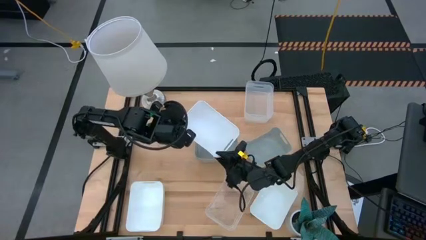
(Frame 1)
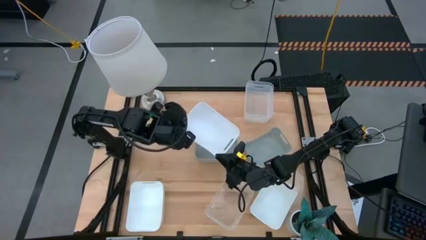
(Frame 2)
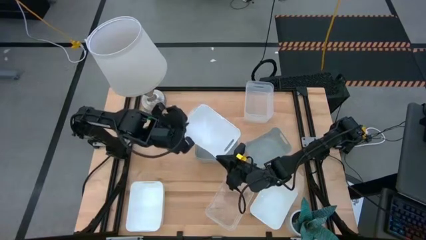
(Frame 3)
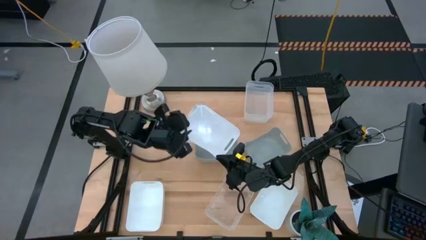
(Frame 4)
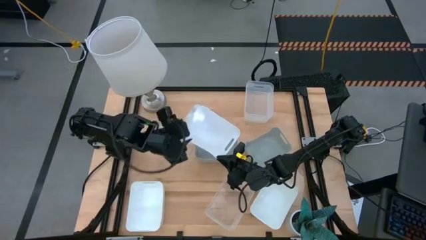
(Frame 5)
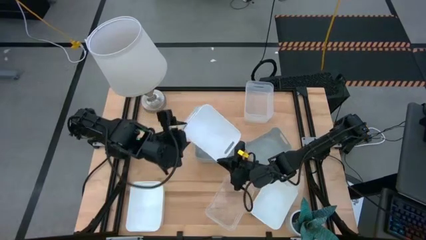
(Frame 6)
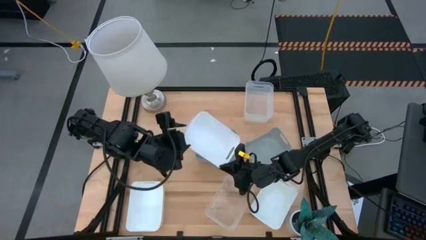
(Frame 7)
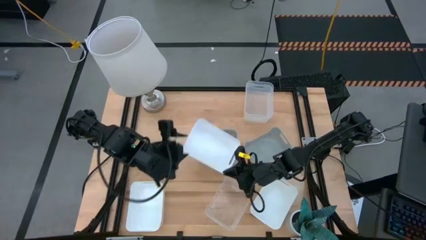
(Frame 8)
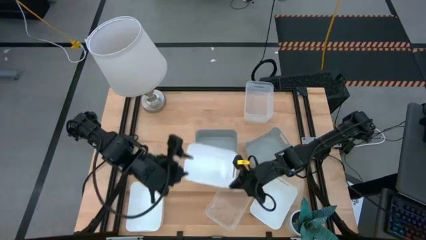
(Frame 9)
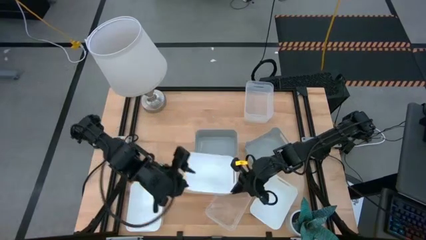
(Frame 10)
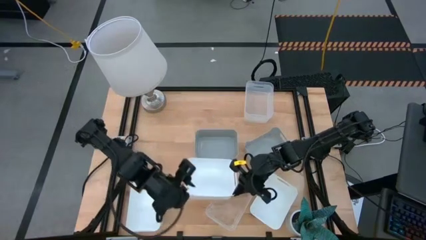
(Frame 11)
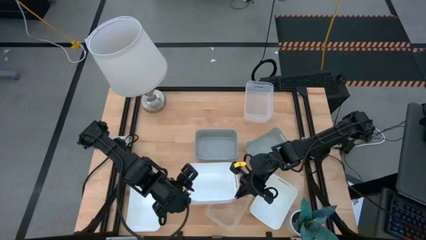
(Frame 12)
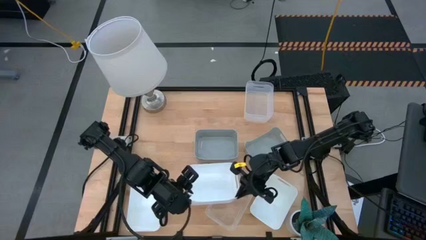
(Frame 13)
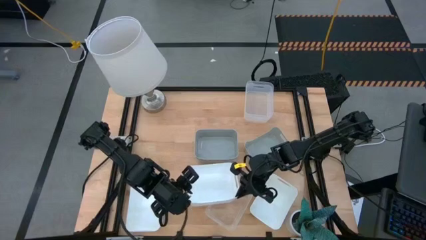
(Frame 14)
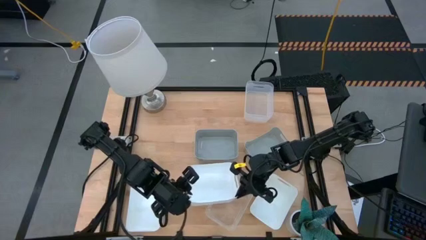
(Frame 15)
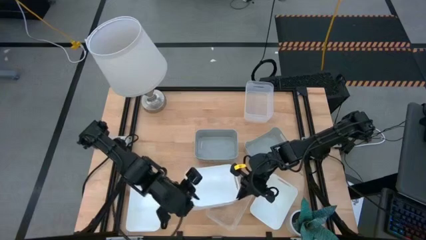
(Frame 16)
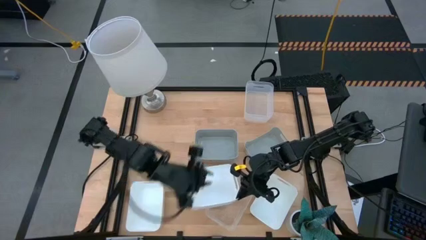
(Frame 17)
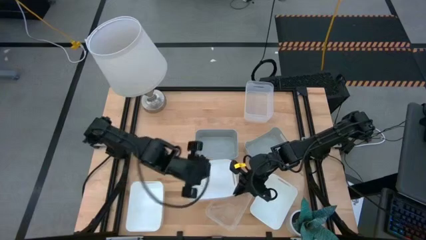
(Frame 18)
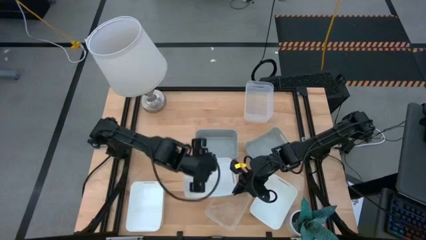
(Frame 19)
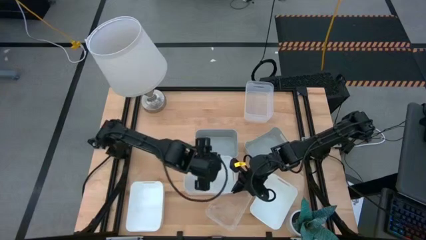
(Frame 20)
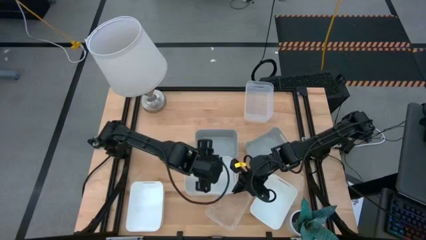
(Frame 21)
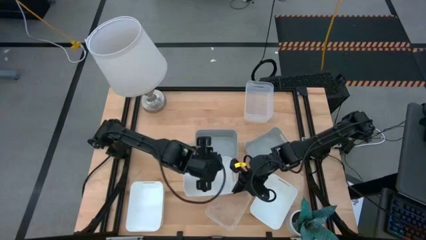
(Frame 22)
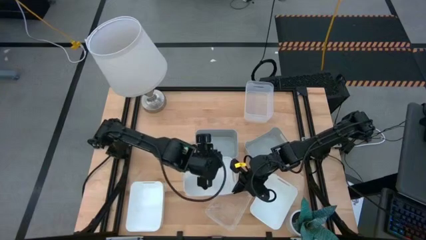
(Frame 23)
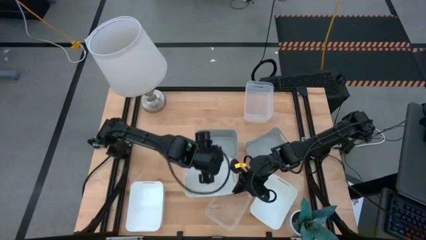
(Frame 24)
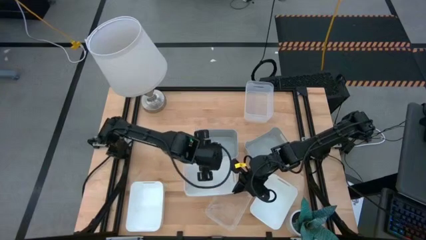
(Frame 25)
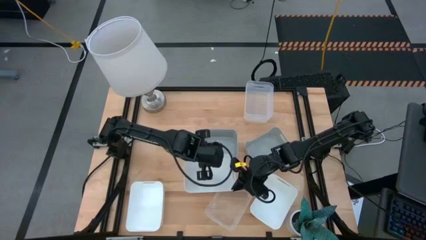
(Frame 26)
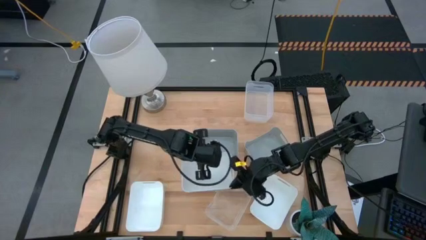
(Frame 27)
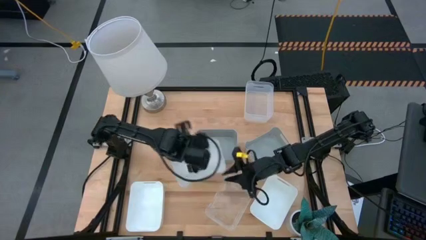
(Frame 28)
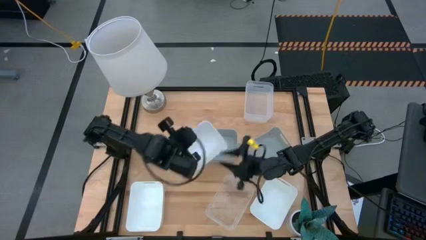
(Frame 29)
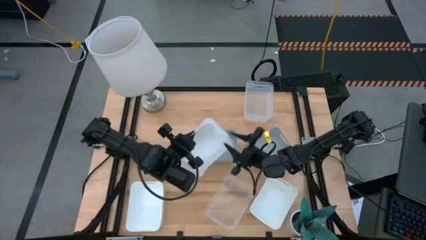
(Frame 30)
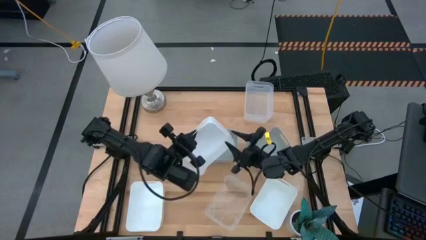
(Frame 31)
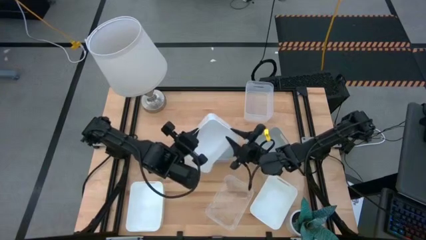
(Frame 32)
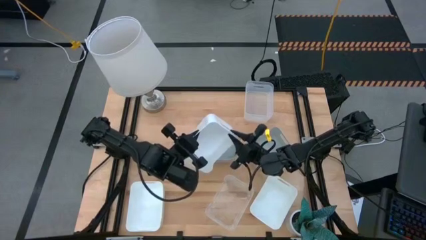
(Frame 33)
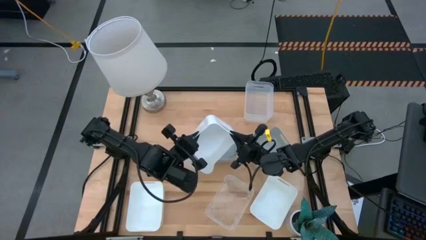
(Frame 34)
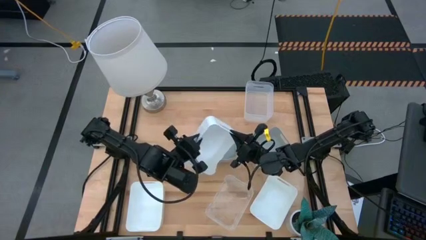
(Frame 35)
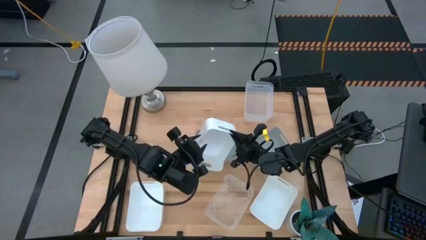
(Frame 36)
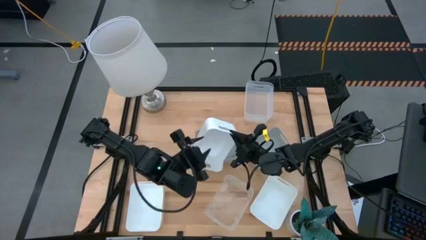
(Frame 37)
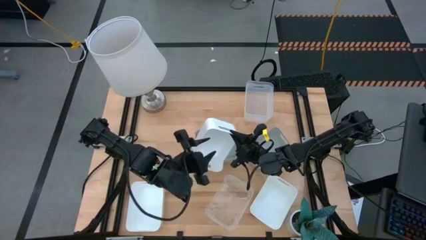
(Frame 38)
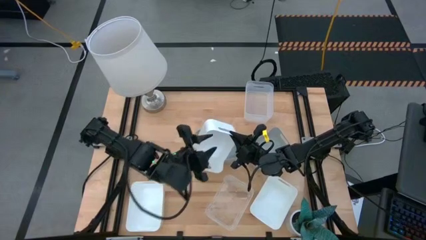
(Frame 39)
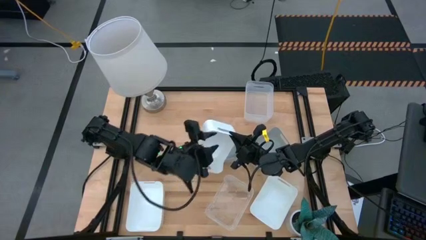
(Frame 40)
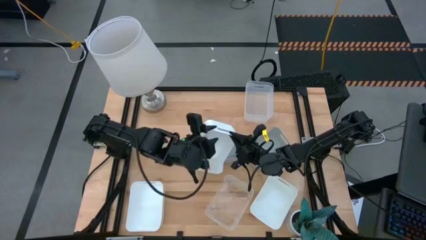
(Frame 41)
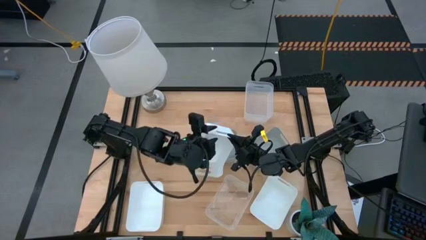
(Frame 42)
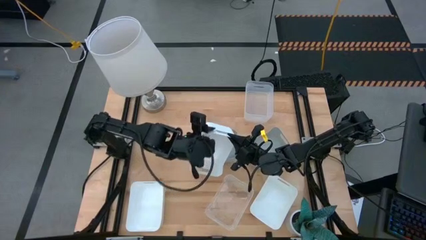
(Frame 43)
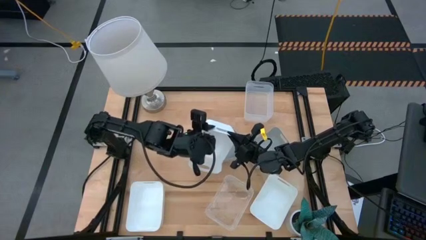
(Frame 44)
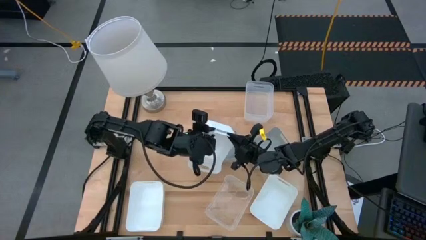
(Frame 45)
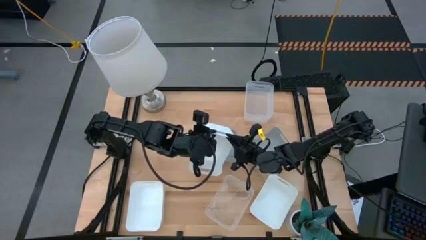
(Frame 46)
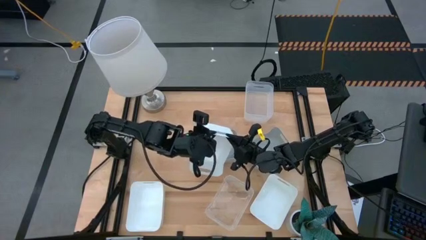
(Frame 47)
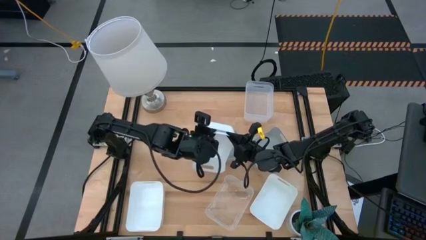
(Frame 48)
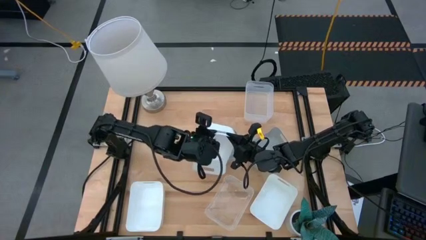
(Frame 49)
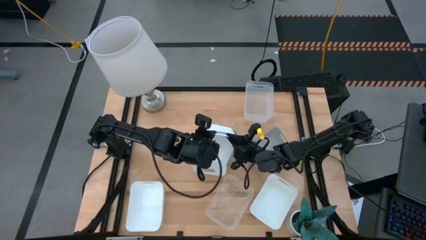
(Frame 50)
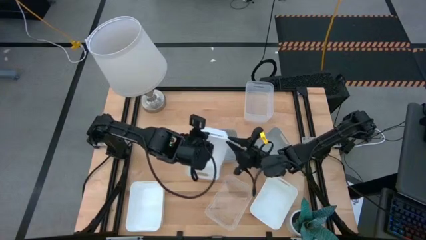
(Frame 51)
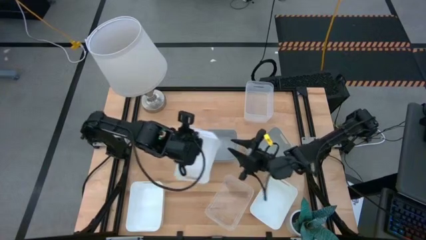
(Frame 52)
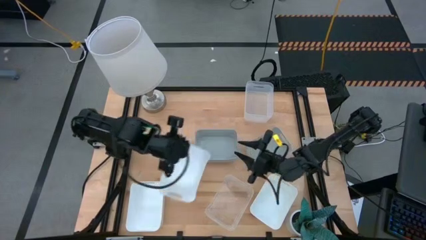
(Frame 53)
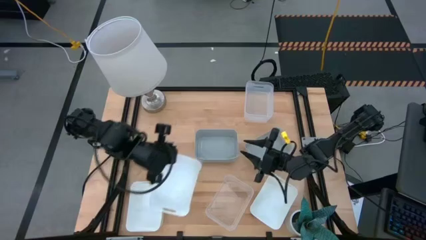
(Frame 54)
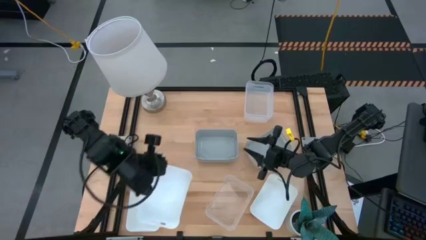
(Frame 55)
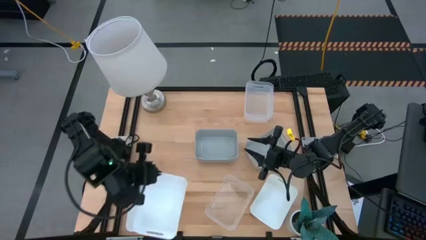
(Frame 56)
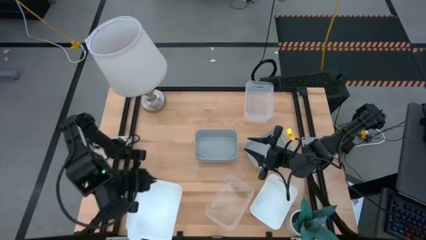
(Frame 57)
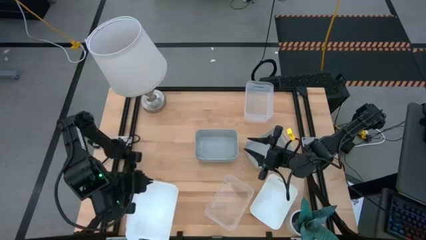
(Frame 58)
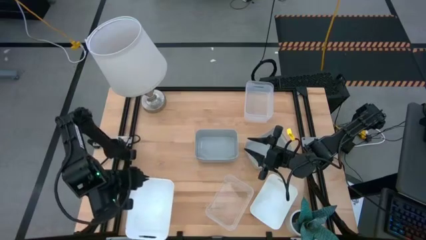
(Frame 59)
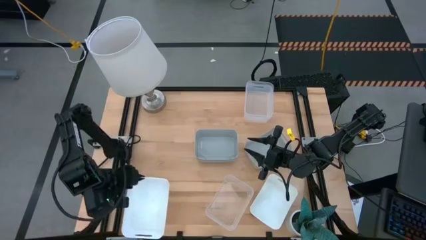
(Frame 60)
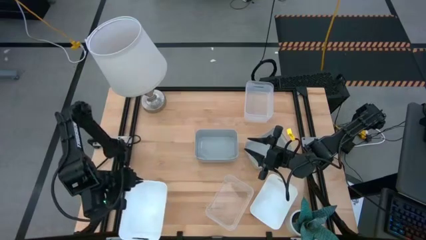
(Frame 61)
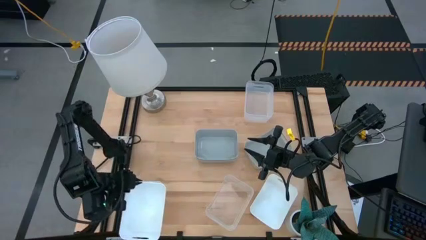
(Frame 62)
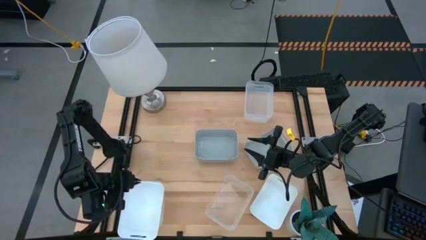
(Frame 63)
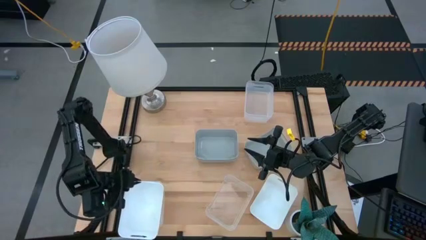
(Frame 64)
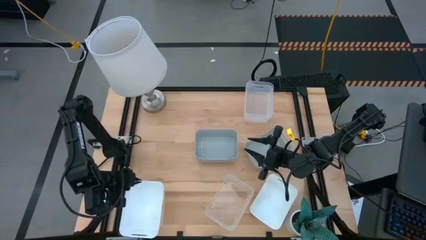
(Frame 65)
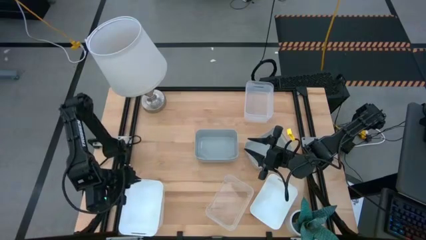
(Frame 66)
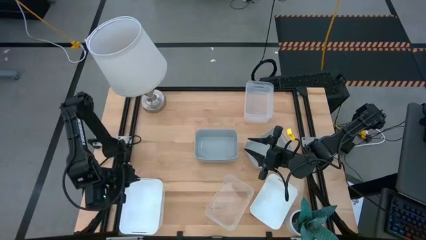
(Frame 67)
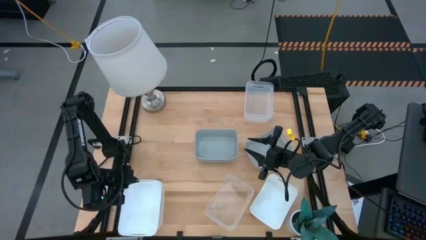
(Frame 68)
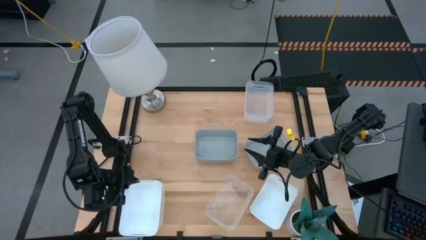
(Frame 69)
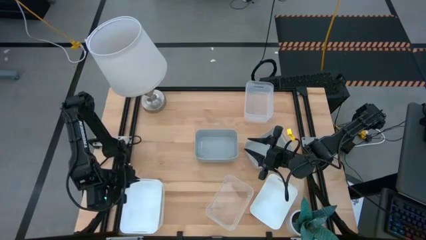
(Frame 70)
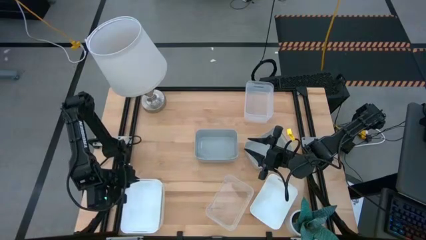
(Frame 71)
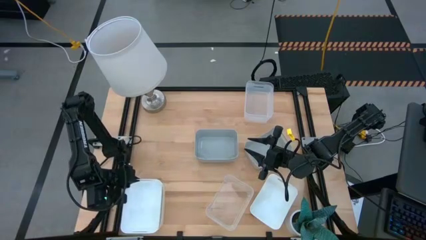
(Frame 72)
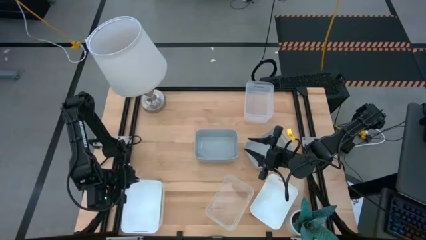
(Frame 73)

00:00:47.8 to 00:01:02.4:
Stack the top white bin on the bottom left white bin
